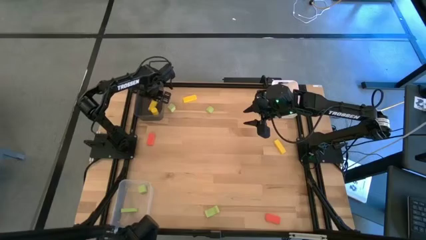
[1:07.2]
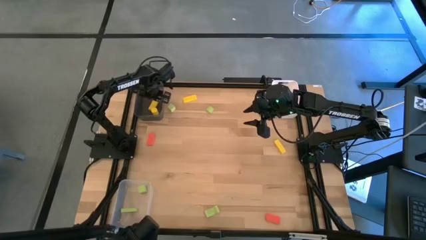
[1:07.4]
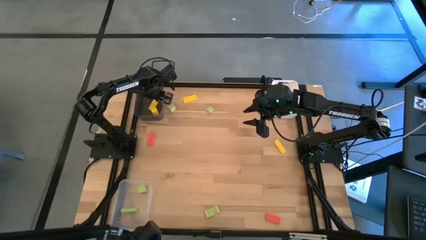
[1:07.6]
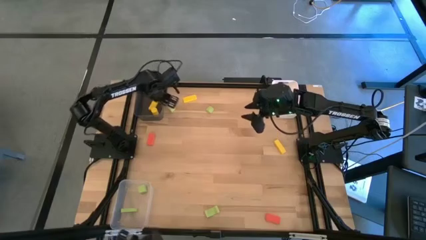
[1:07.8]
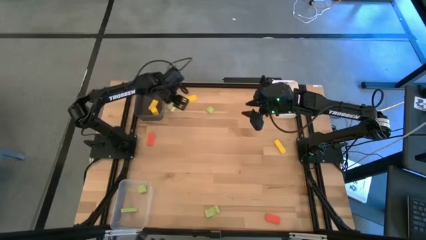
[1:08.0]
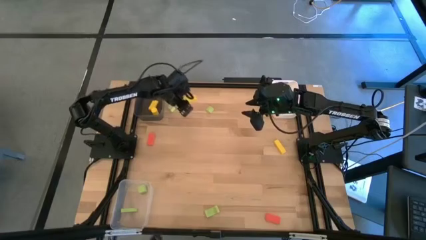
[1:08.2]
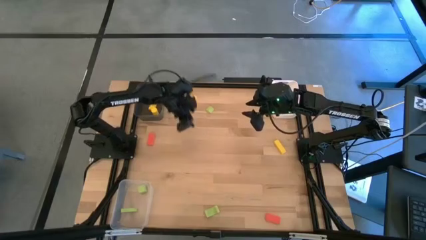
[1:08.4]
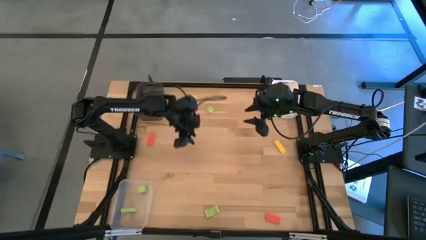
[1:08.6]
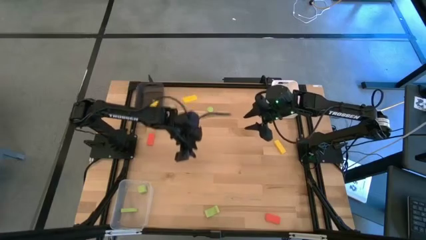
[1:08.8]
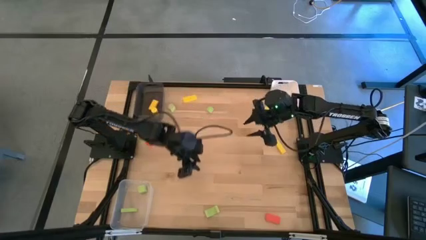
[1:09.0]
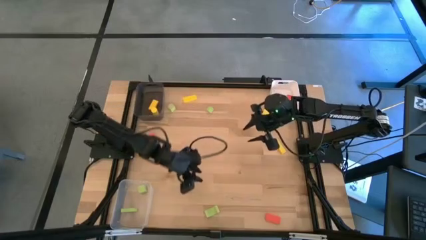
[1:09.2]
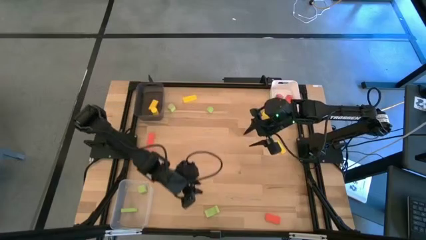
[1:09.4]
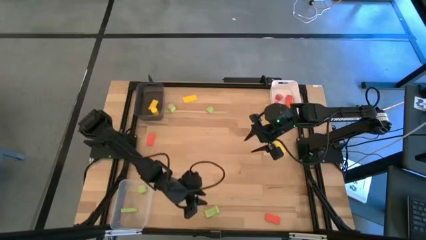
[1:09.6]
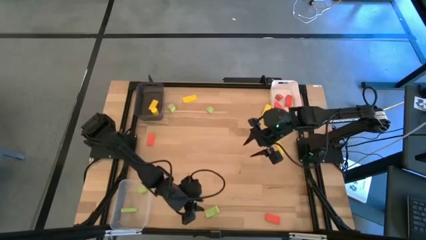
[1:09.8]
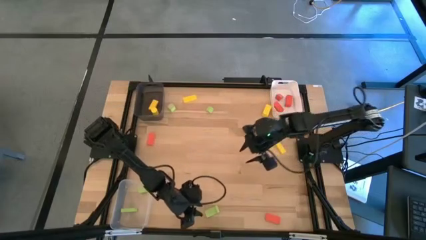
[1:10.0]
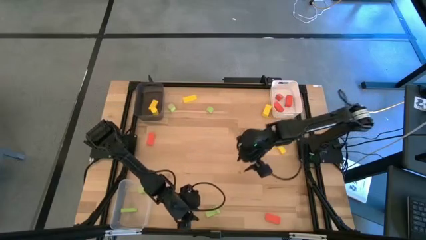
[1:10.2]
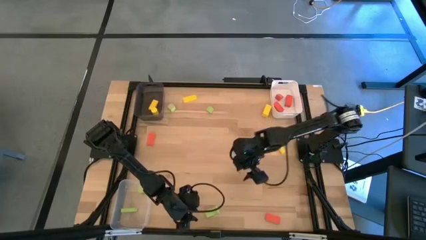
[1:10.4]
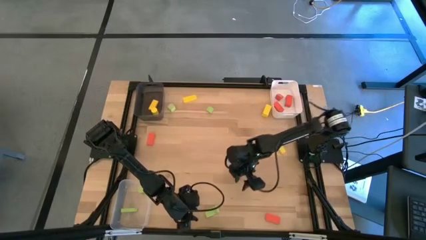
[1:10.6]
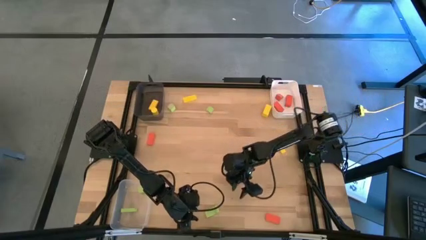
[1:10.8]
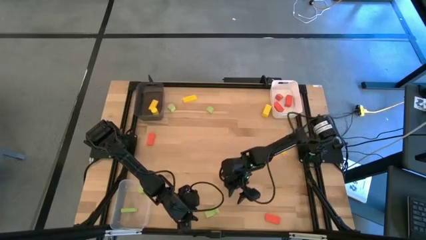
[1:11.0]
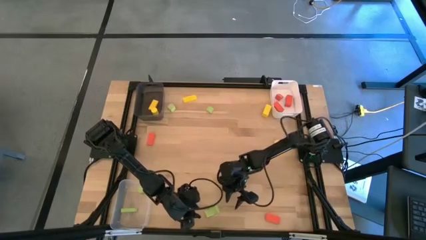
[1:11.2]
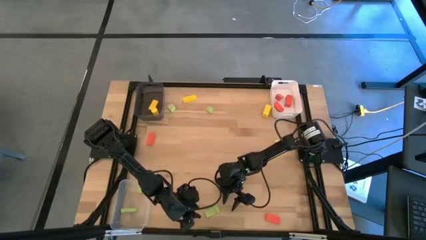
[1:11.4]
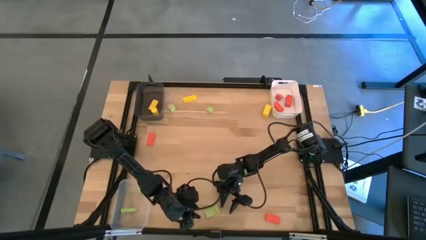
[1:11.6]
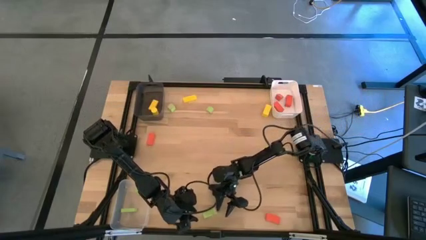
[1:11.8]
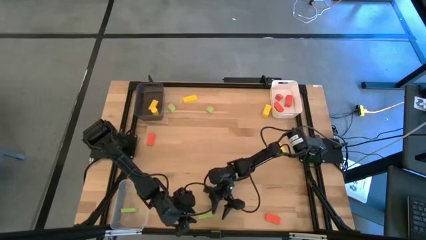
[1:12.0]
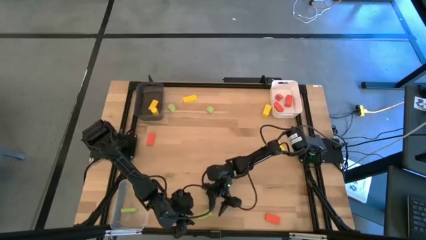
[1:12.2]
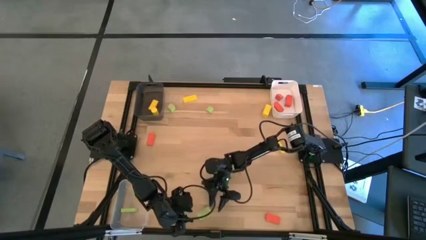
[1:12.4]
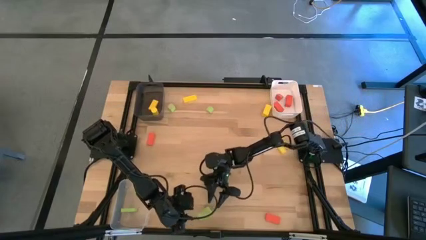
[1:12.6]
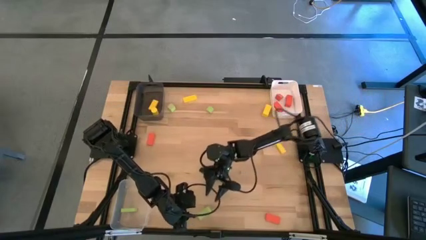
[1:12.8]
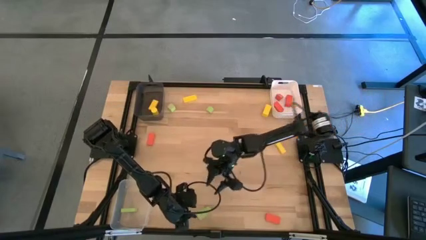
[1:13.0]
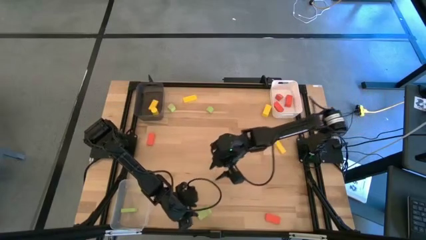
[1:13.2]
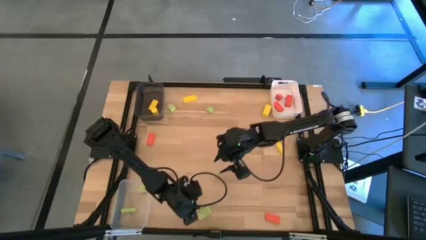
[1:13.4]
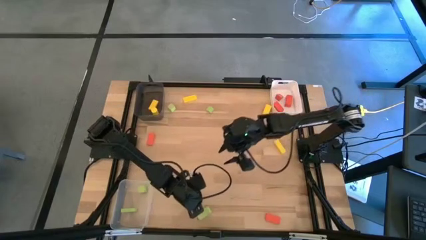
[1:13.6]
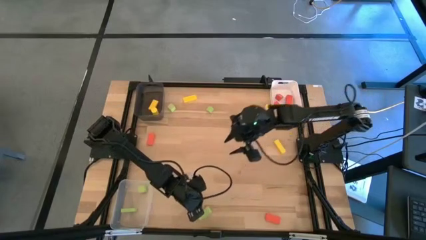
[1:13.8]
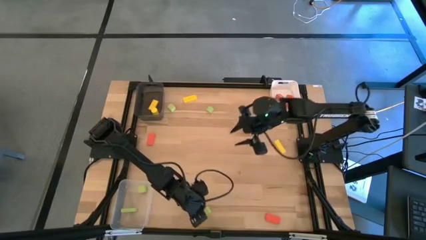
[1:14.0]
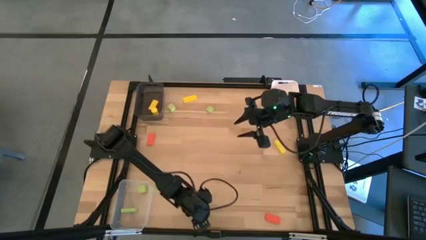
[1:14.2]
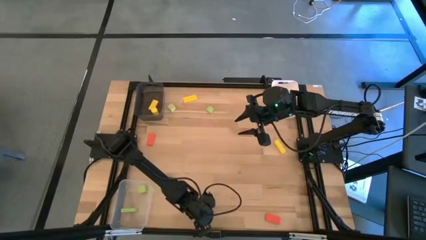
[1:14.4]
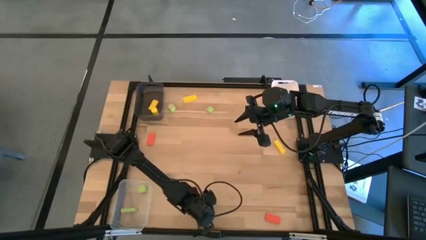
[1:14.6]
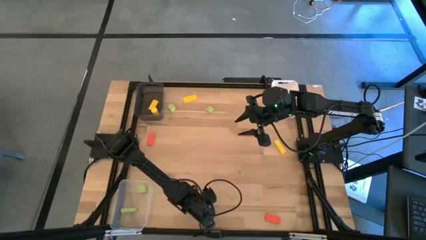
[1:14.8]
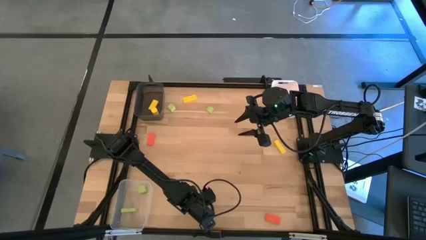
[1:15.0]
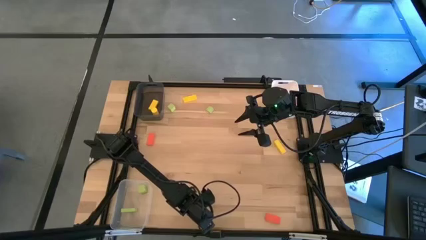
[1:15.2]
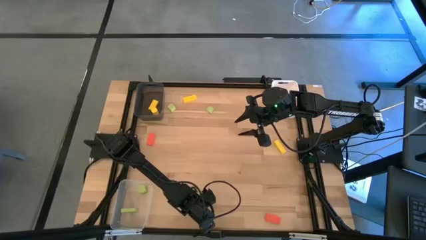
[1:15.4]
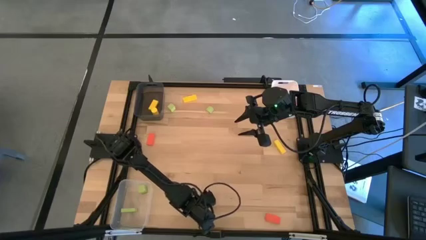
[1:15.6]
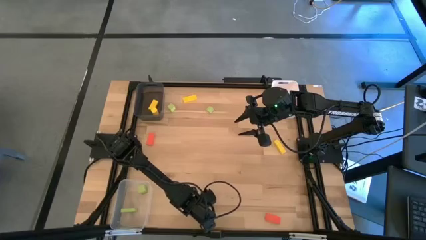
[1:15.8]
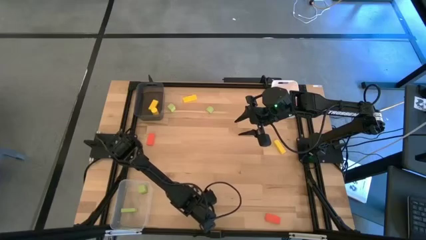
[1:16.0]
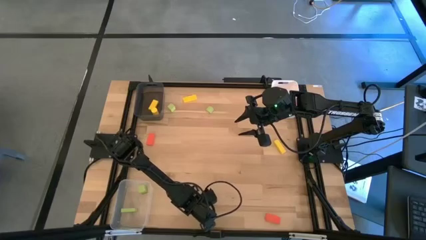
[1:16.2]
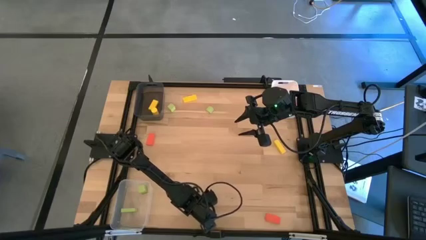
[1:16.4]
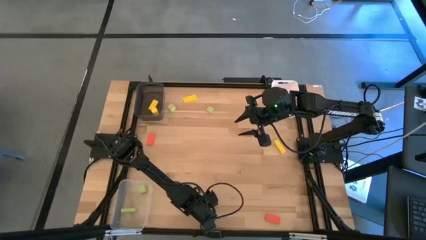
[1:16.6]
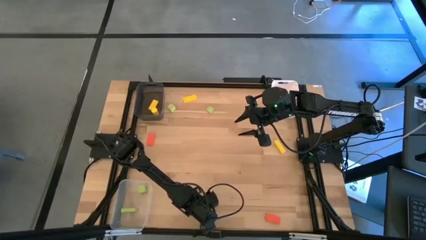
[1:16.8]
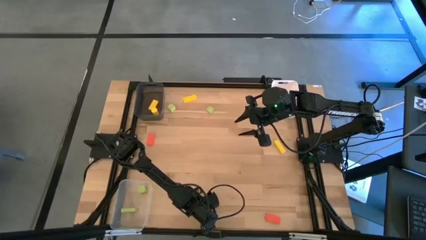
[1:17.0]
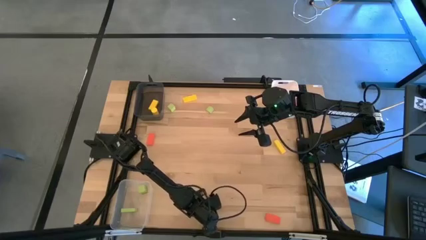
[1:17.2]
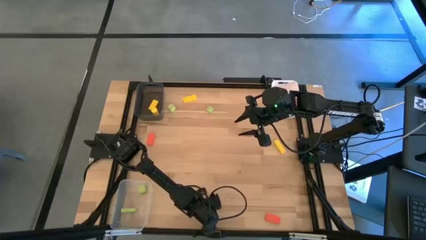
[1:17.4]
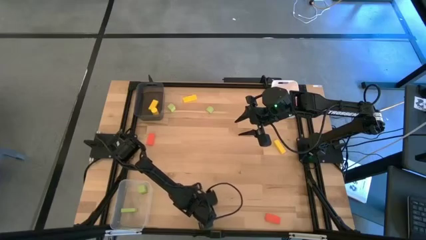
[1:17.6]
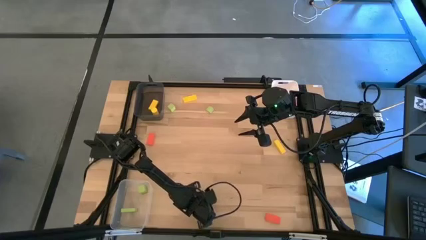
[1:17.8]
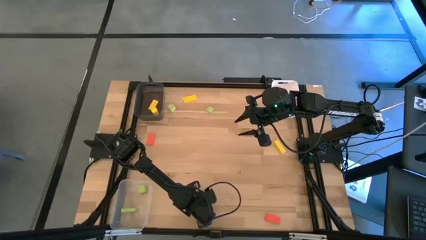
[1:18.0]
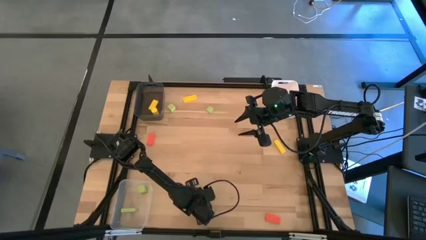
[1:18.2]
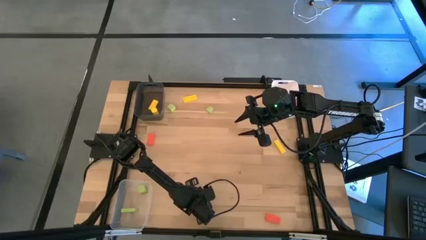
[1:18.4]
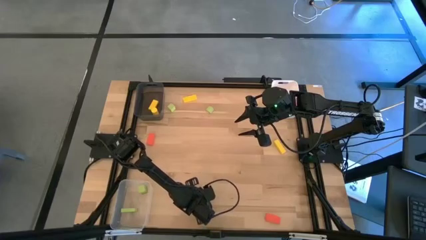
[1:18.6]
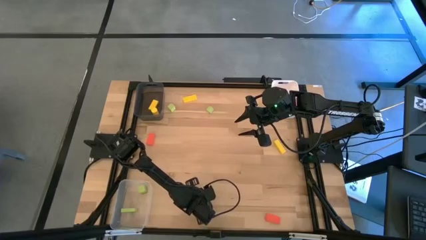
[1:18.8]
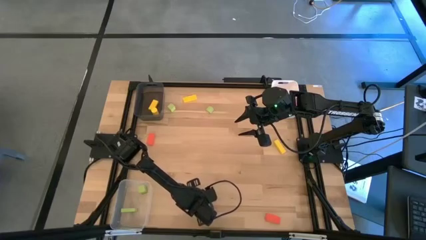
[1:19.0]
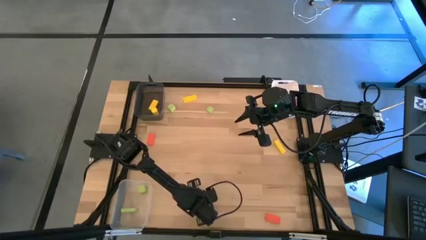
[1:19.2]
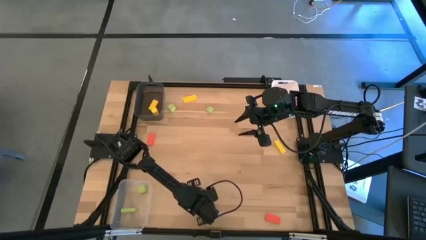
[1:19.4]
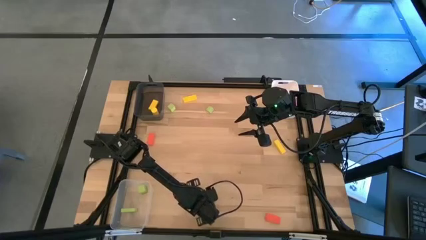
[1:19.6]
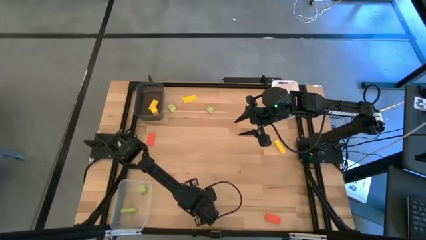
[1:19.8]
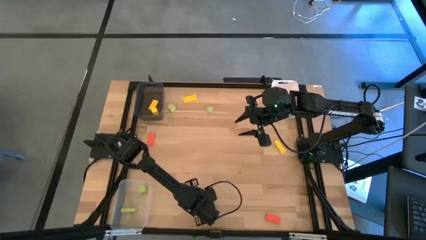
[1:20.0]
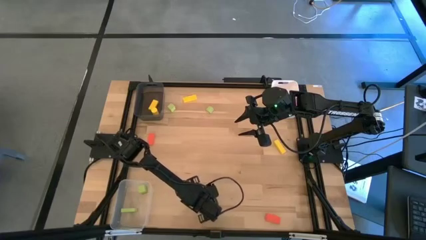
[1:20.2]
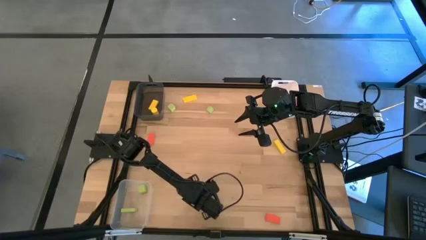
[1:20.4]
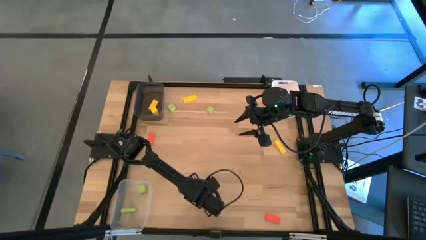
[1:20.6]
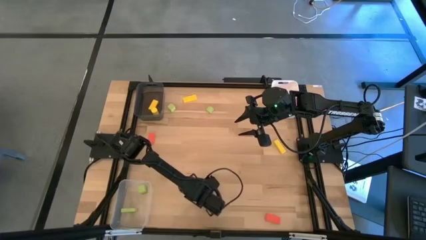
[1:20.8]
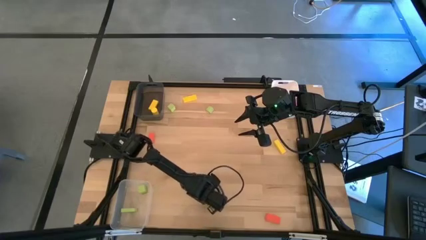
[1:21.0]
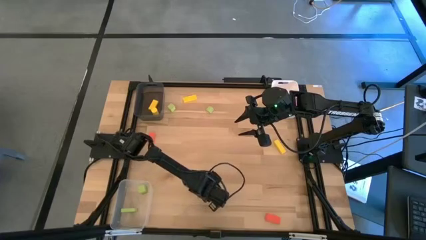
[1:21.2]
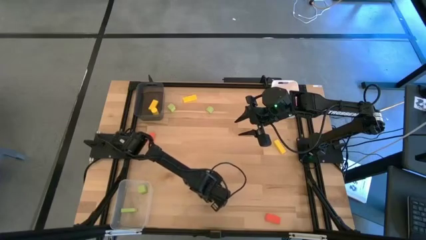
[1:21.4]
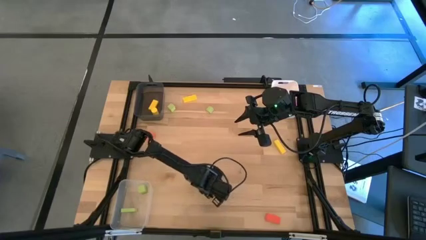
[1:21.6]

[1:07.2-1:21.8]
Task: Sort & place blocks by color
Put the green block into the transparent bin

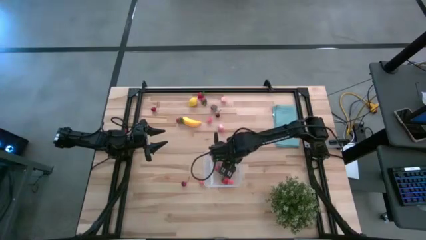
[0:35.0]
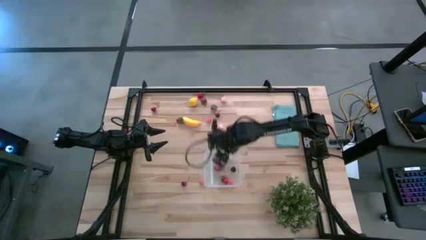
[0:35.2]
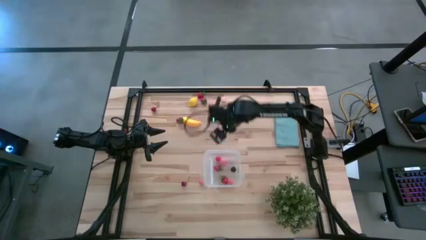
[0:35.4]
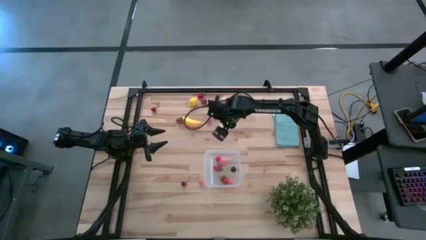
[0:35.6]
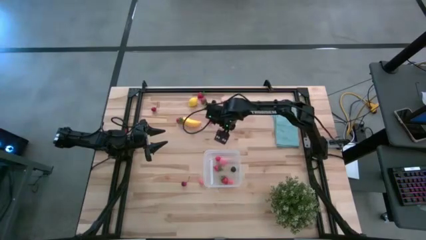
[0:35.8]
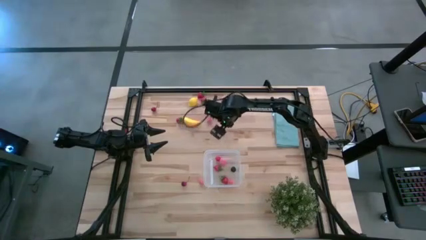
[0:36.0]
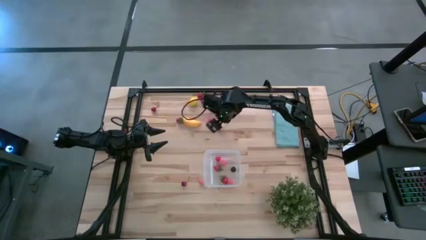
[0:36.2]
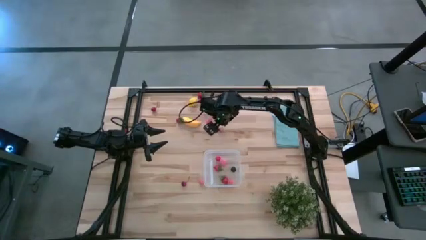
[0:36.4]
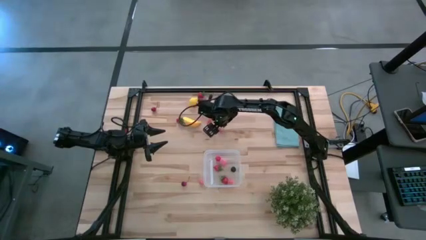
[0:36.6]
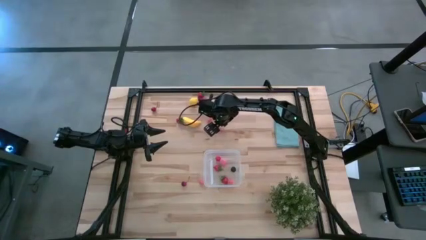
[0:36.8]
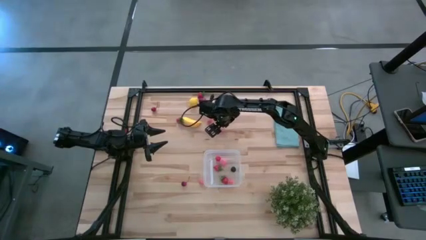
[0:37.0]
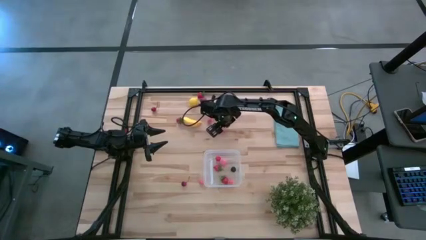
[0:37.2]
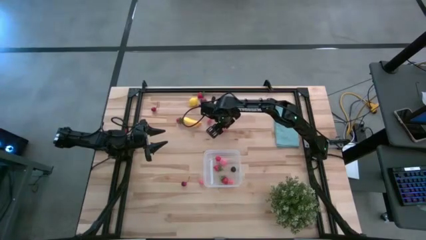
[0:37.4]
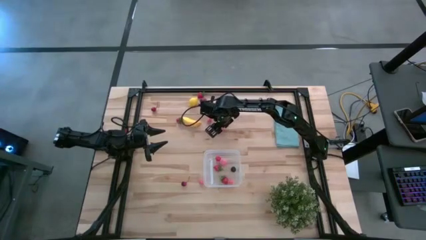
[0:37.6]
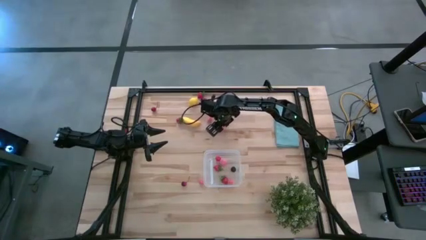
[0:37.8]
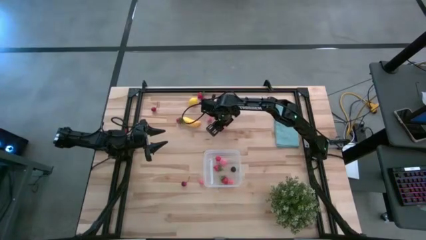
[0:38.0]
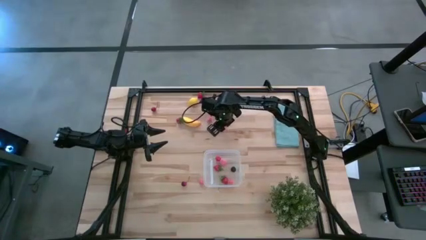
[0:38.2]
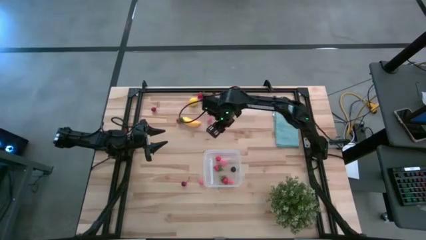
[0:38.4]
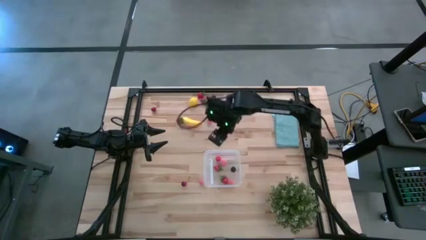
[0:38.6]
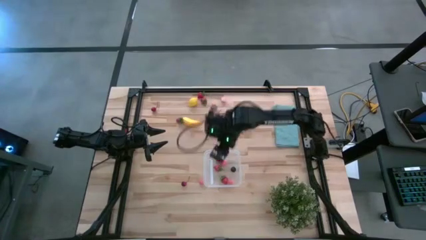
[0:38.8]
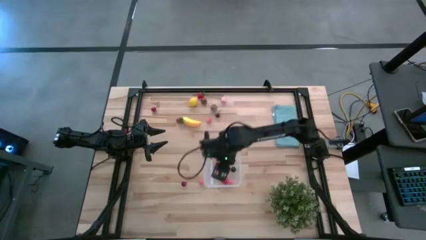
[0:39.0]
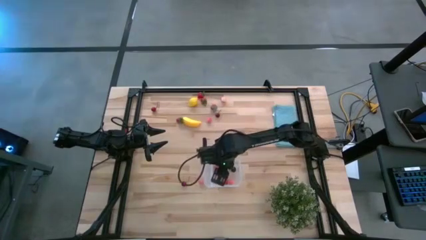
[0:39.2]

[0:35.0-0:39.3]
Task: Pick and placing Produce into tupperware
Put the pink peach into the transparent bin
